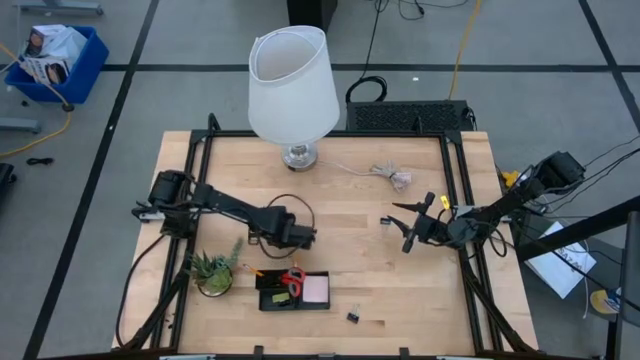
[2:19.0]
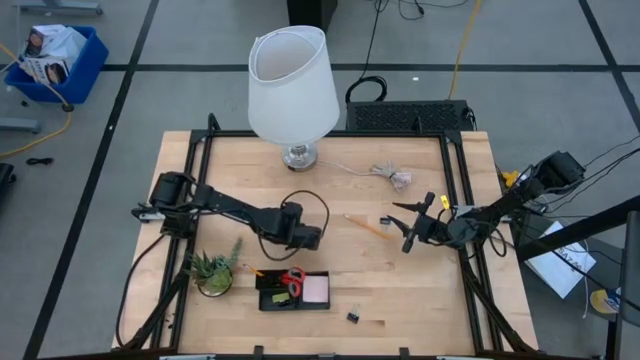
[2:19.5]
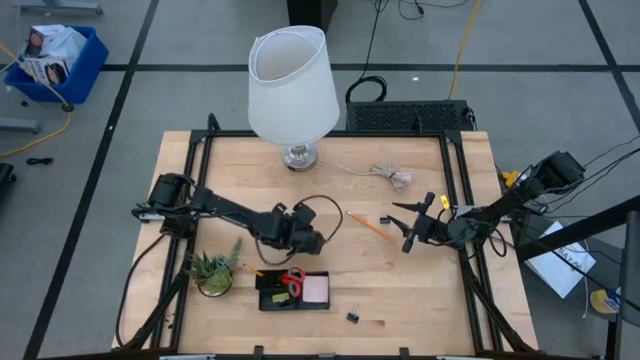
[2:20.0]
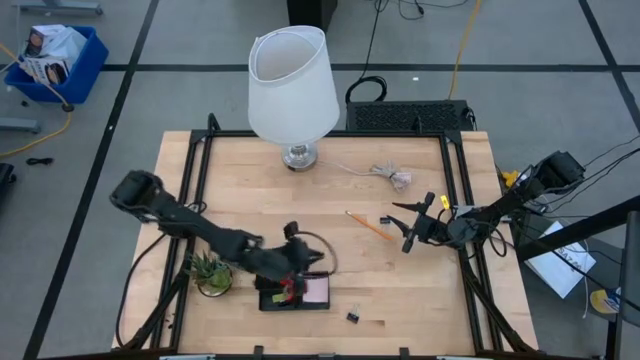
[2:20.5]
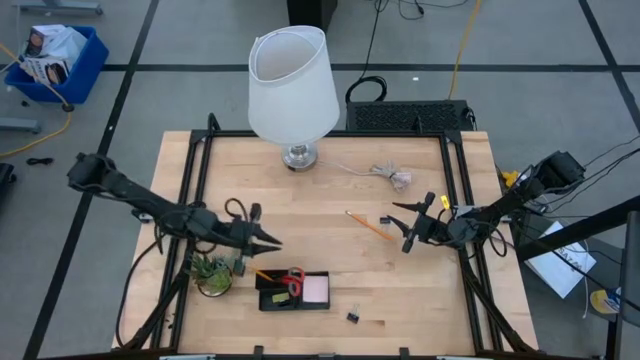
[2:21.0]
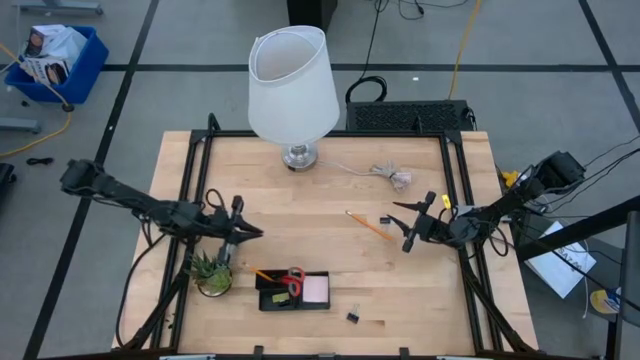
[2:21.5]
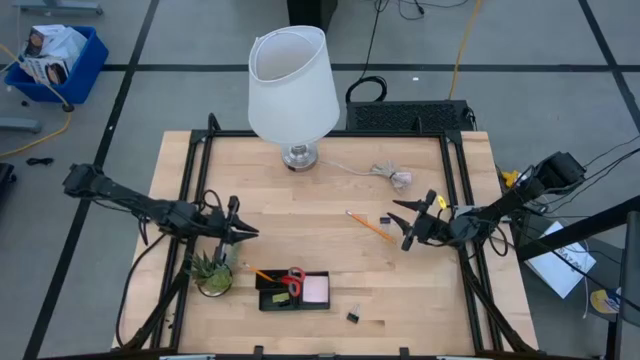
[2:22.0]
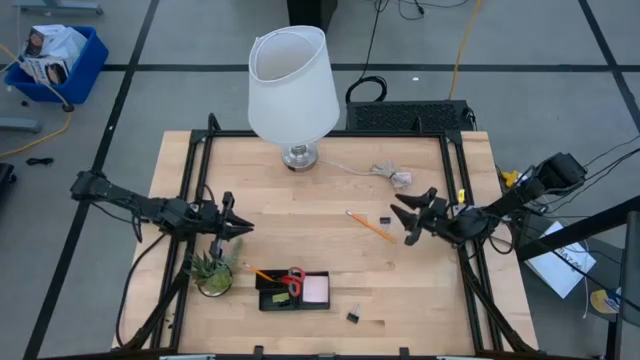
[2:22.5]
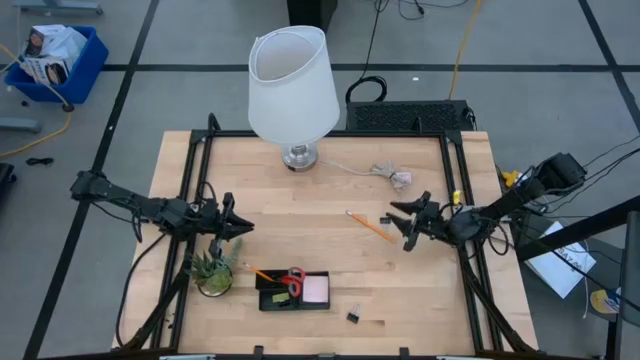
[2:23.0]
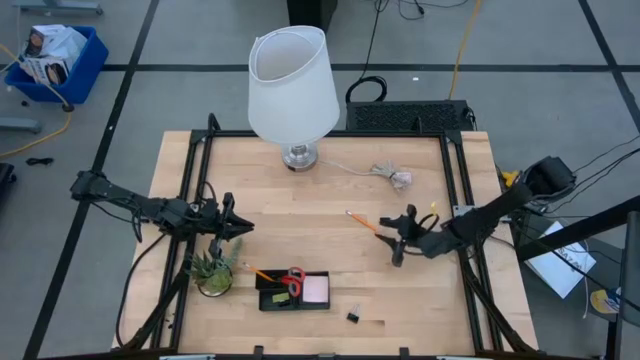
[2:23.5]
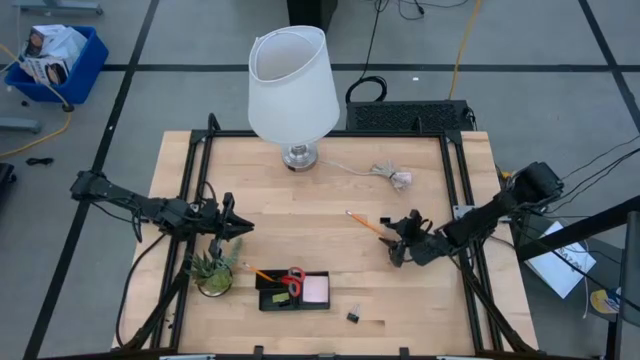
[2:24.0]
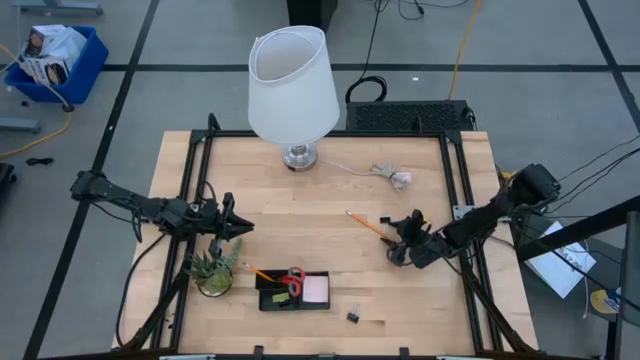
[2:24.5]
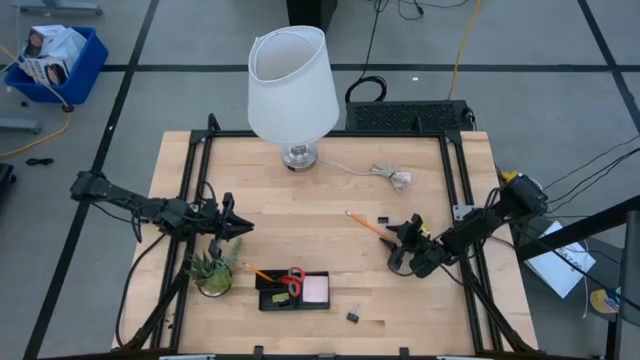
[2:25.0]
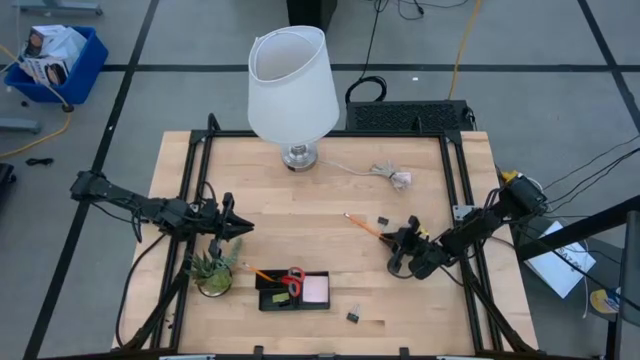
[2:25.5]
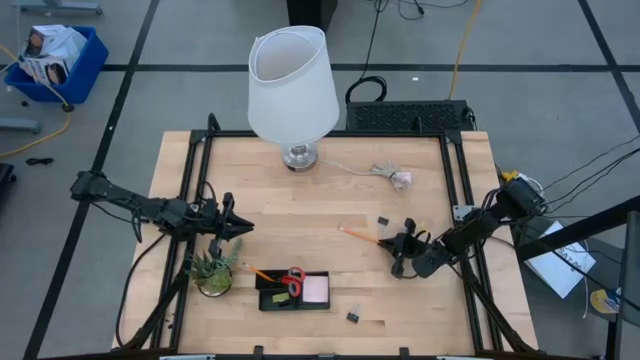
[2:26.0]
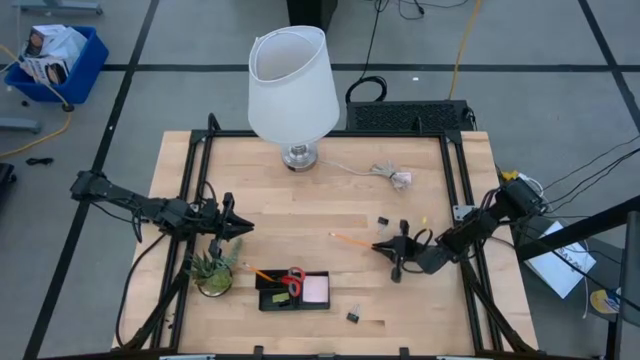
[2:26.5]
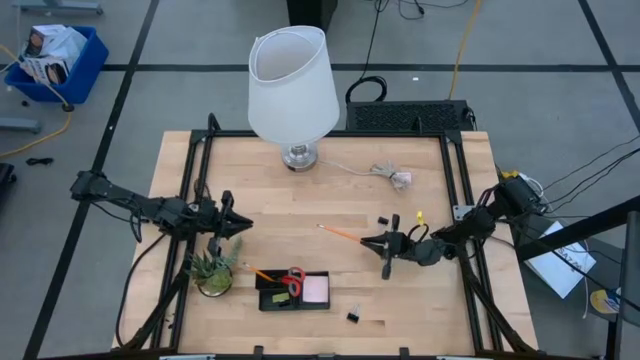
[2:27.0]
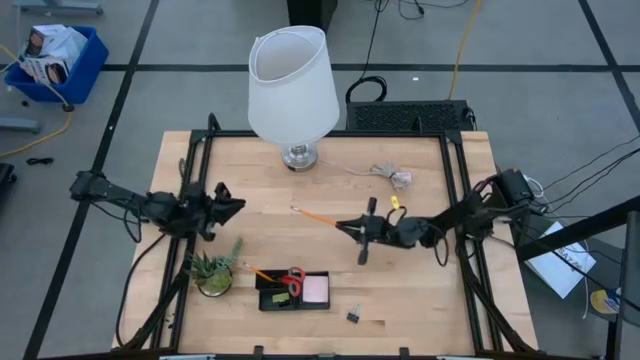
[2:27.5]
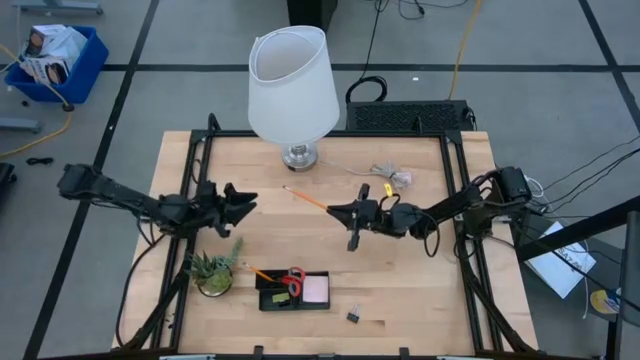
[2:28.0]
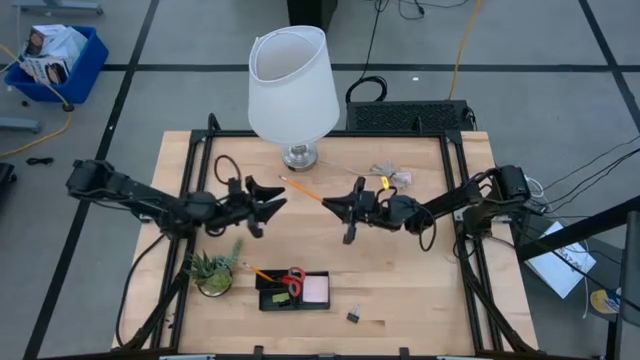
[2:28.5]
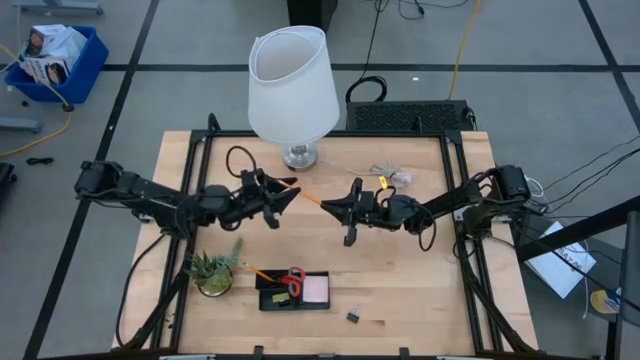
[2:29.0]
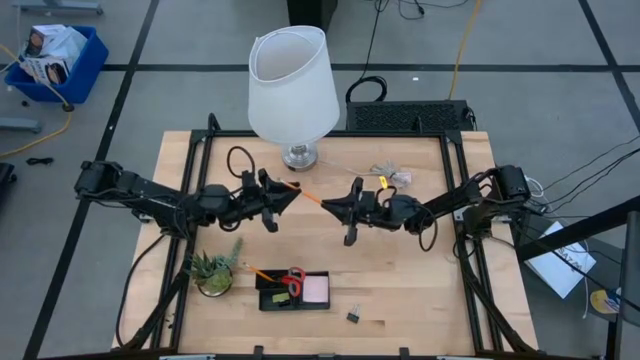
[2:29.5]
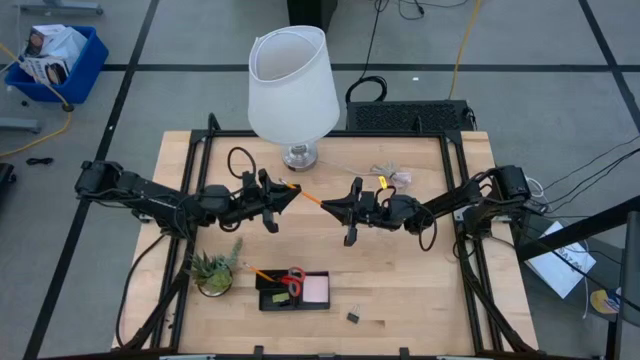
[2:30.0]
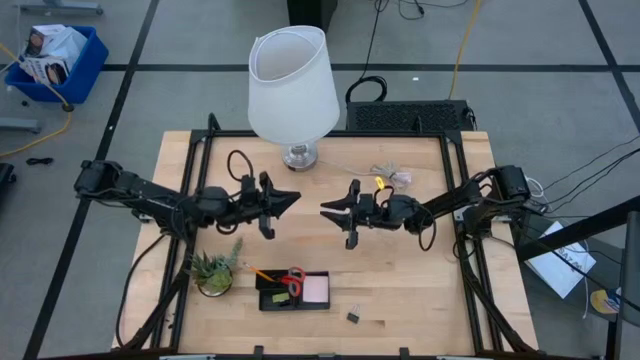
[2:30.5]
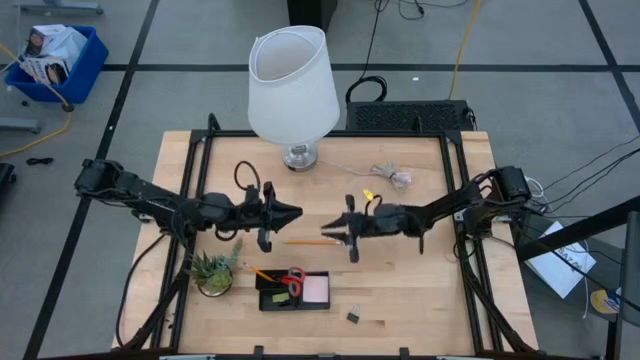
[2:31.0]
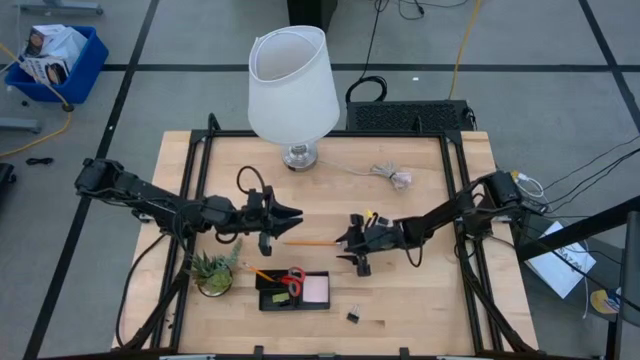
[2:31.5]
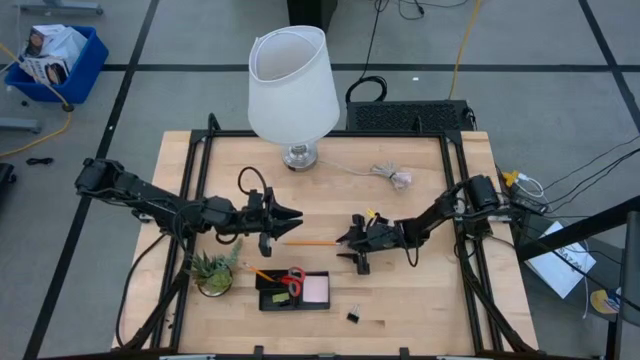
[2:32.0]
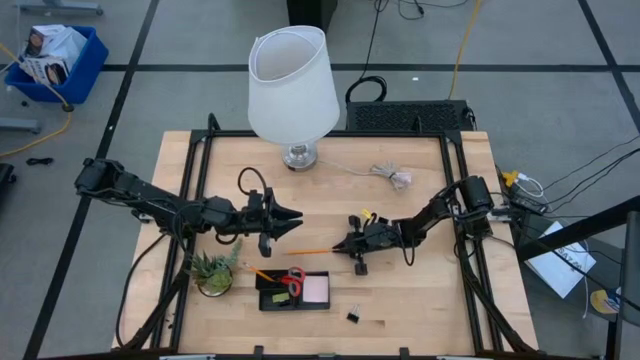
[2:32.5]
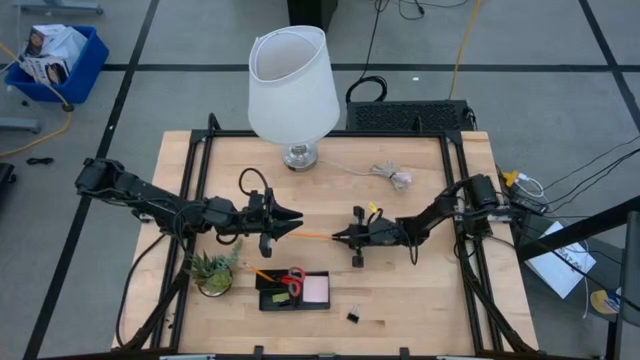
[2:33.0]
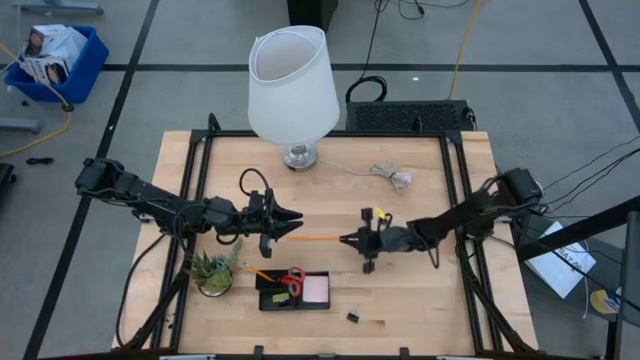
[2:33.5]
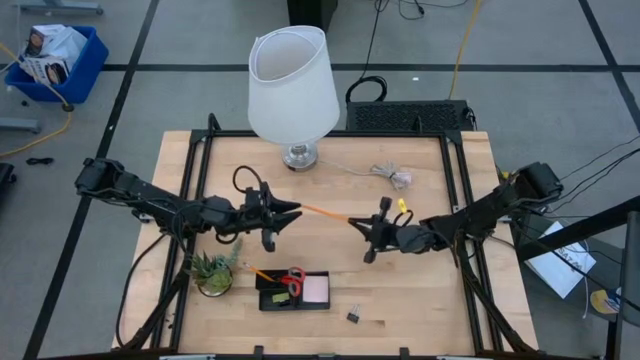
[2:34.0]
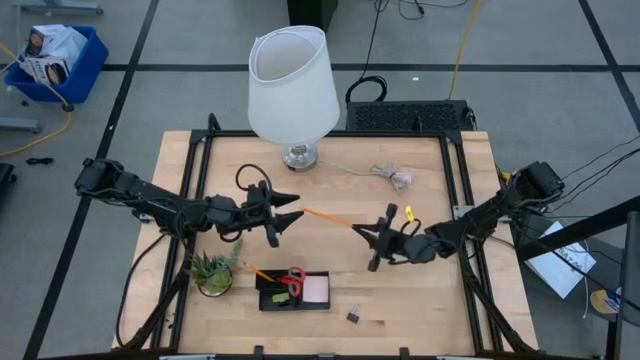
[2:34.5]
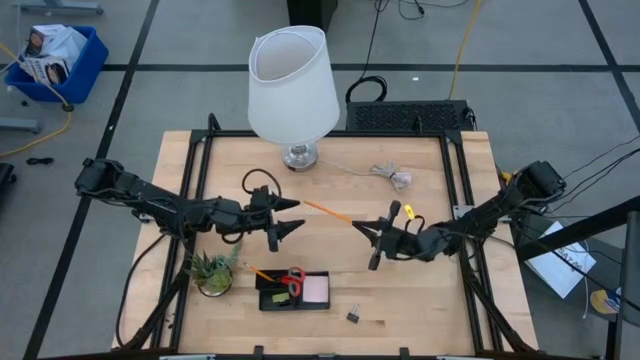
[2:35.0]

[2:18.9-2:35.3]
Task: Pick and place office supplies into organizer
Put the yellow pencil into the black desk organizer

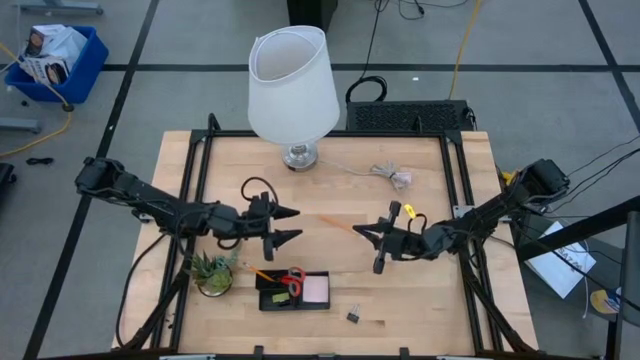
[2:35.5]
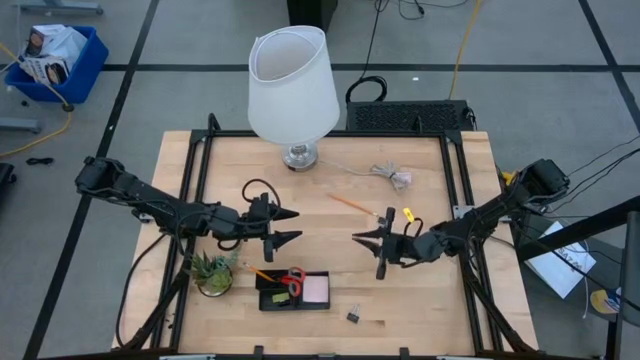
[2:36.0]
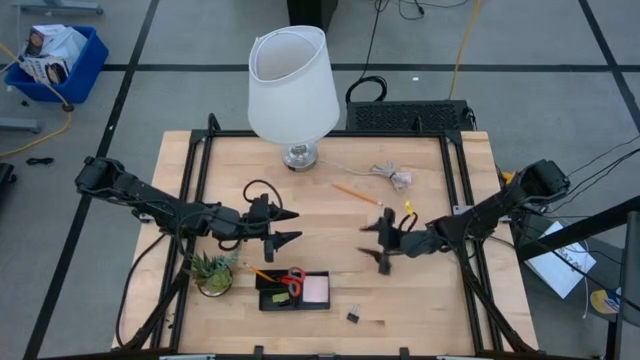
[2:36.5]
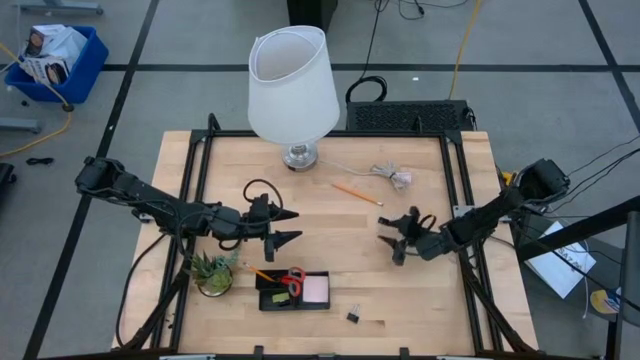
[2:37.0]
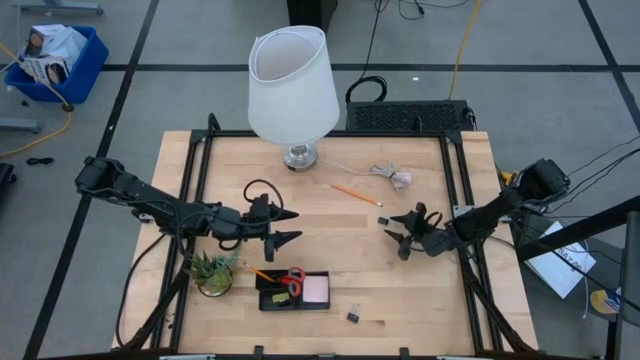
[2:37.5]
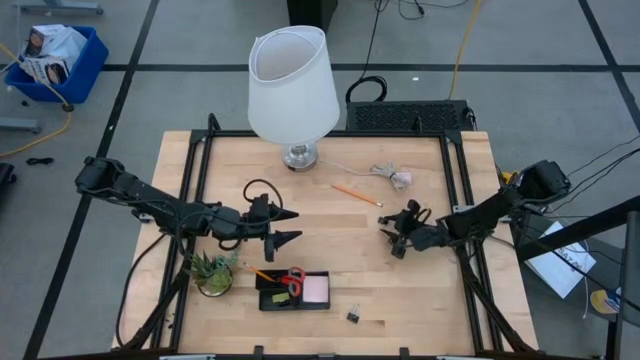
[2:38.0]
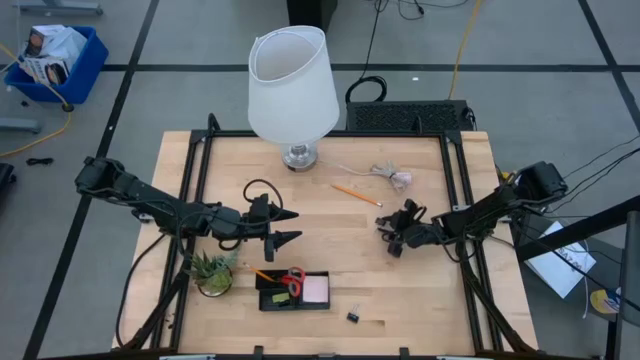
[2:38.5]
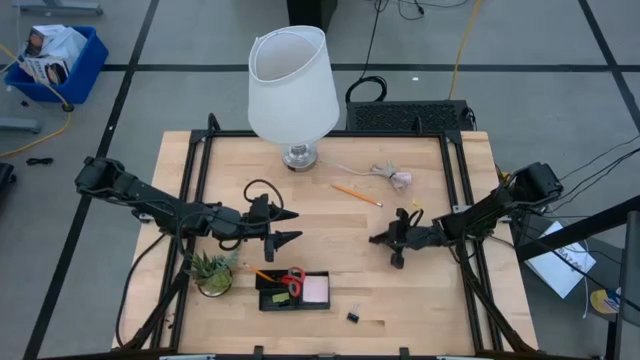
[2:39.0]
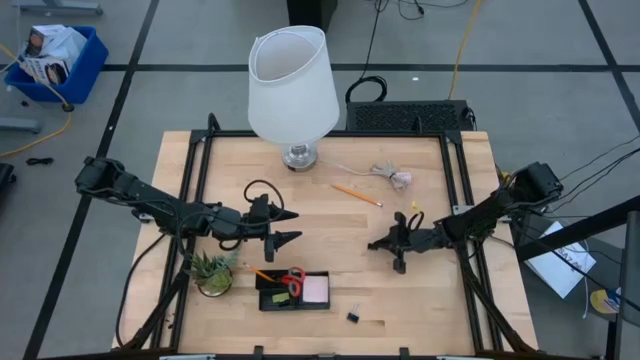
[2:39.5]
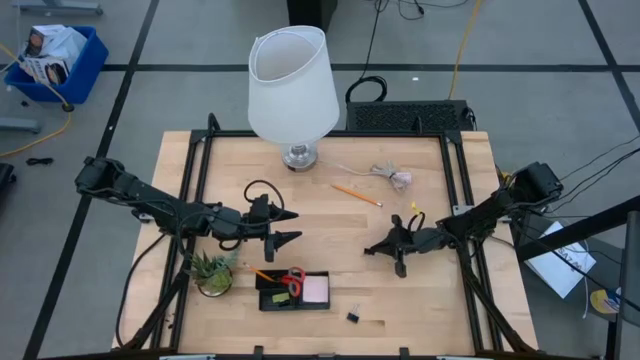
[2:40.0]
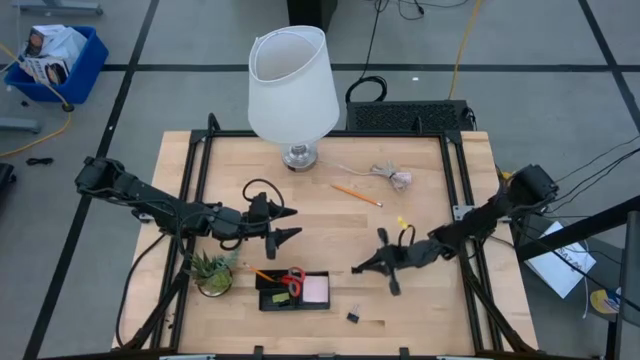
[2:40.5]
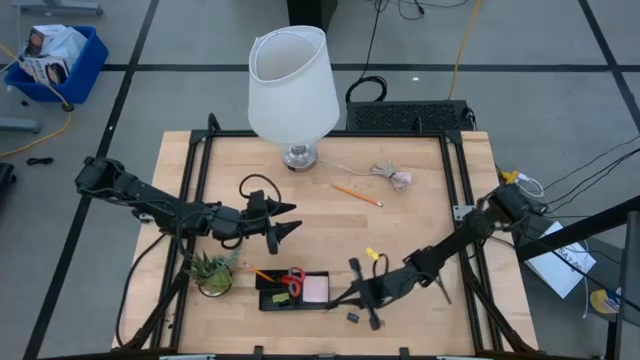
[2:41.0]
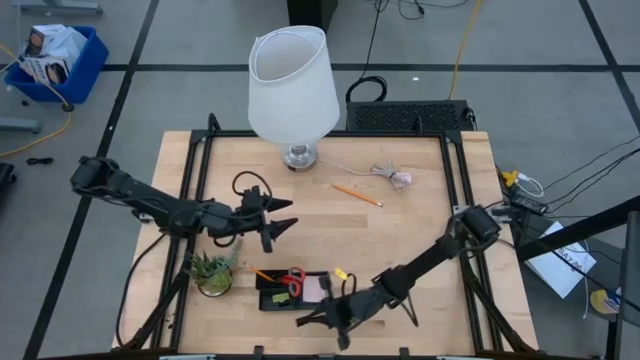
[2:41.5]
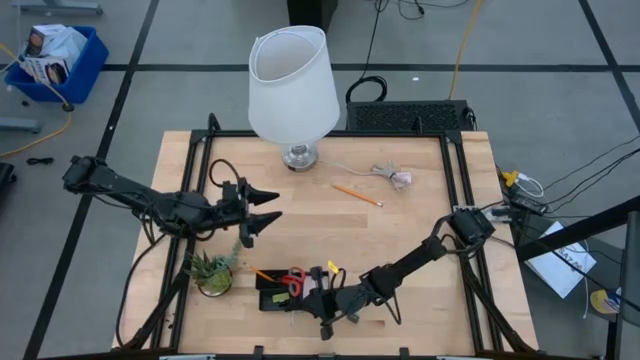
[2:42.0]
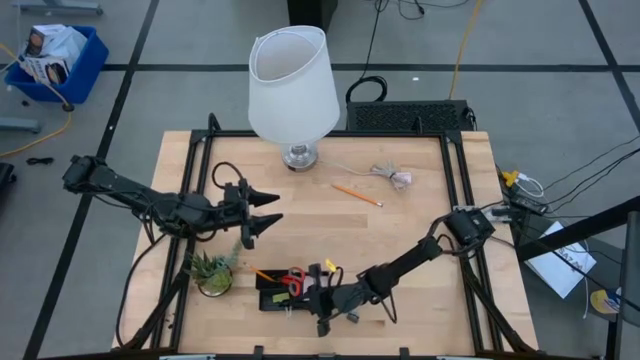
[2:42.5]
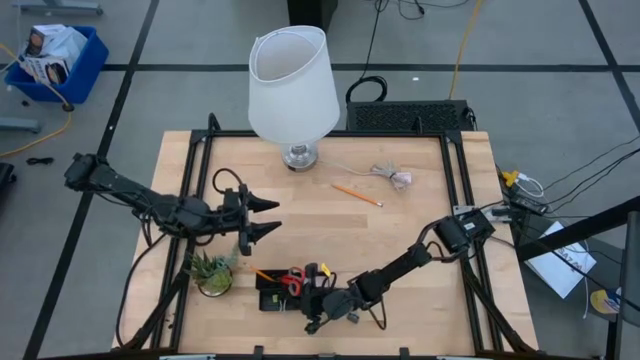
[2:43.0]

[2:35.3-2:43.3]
Put the black paper clip into the black desk organizer
